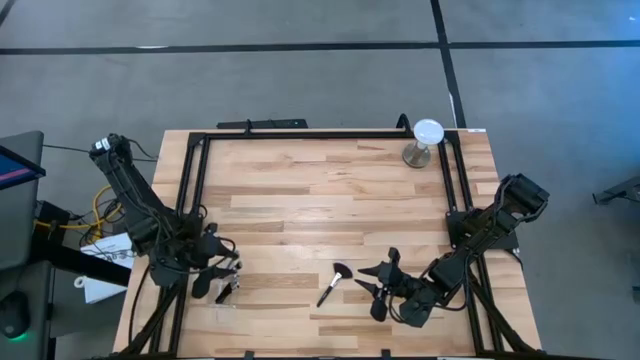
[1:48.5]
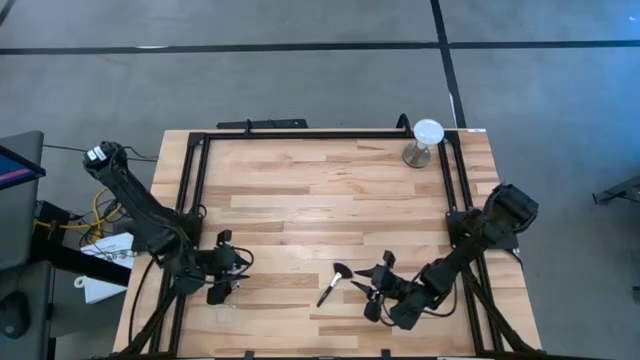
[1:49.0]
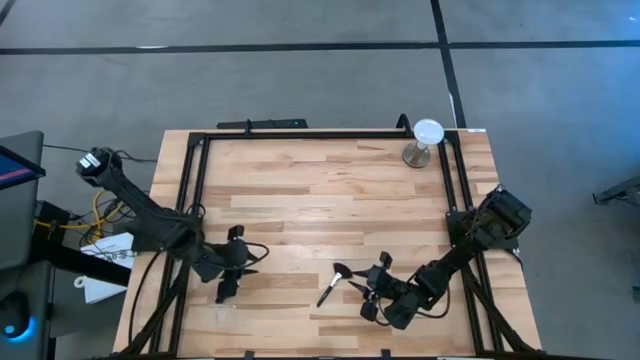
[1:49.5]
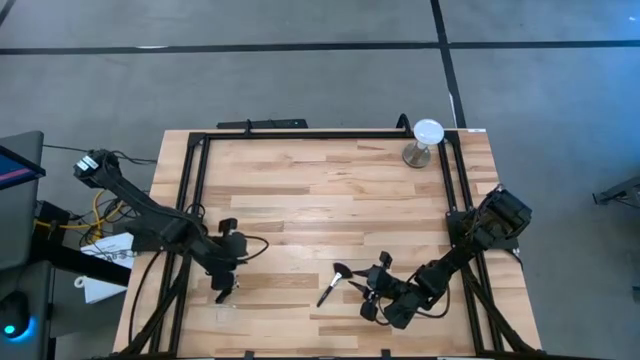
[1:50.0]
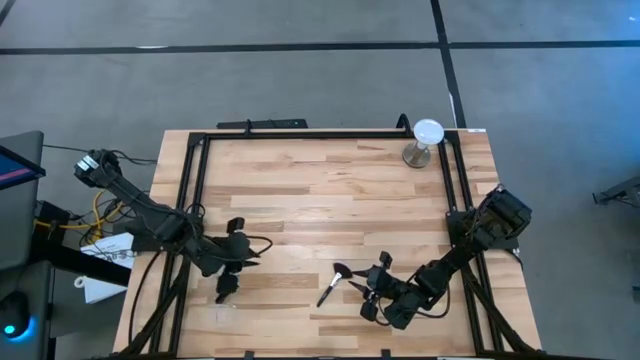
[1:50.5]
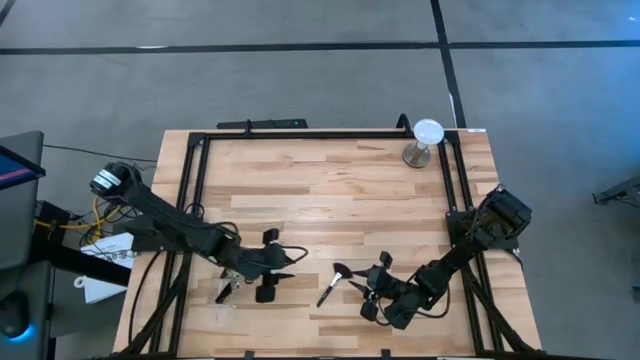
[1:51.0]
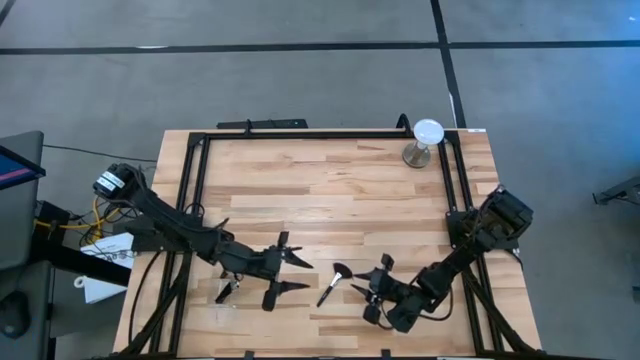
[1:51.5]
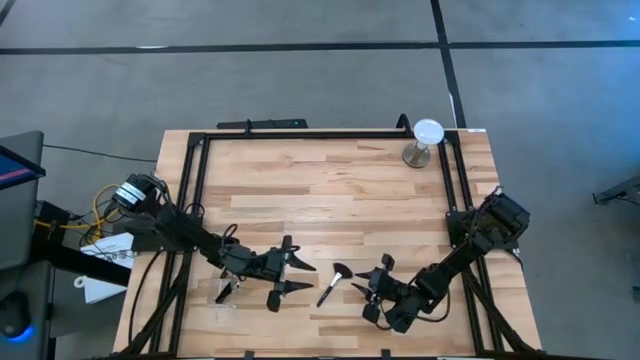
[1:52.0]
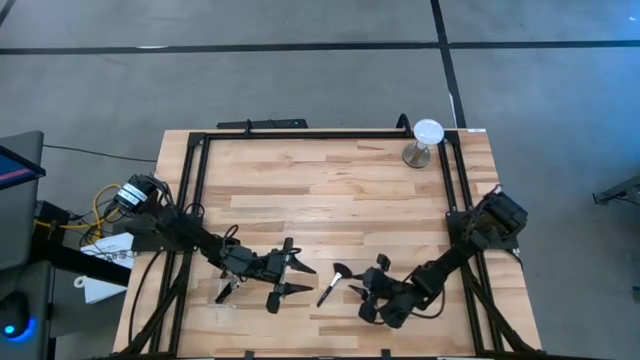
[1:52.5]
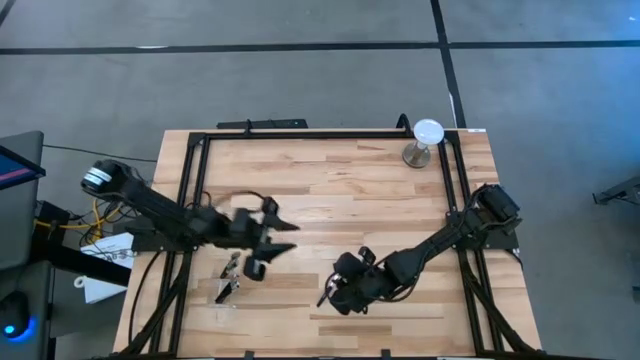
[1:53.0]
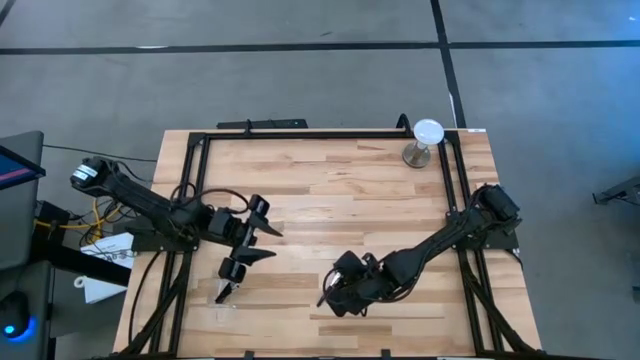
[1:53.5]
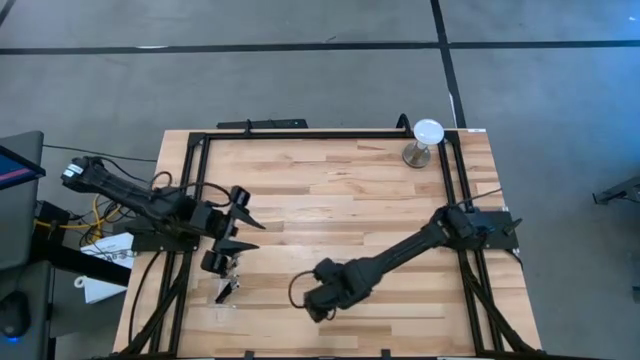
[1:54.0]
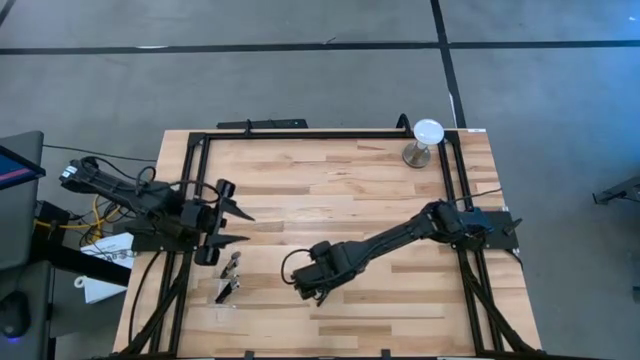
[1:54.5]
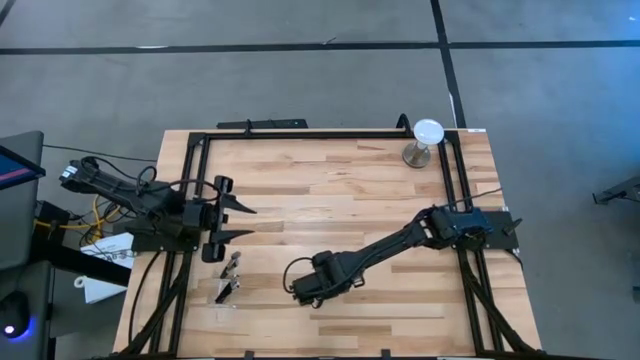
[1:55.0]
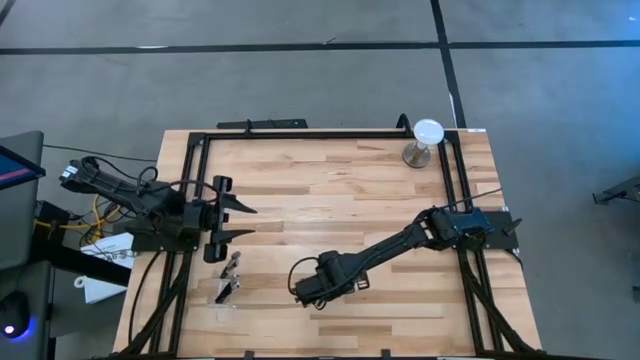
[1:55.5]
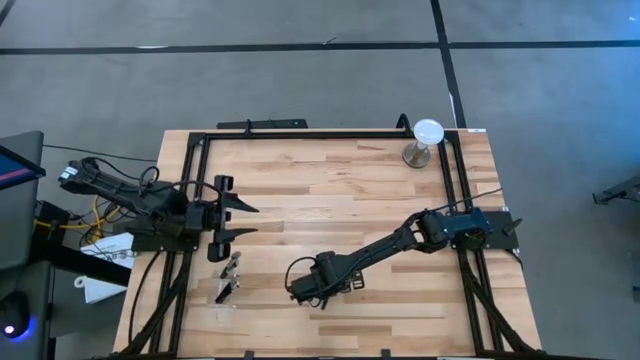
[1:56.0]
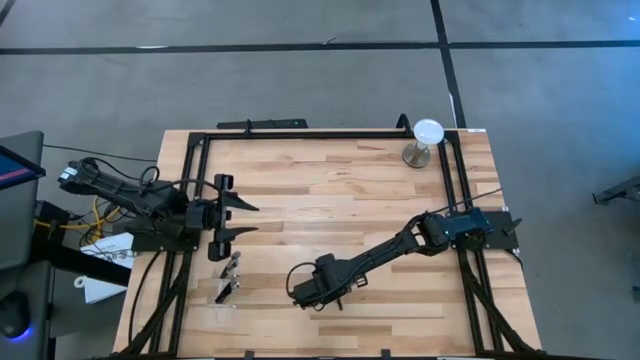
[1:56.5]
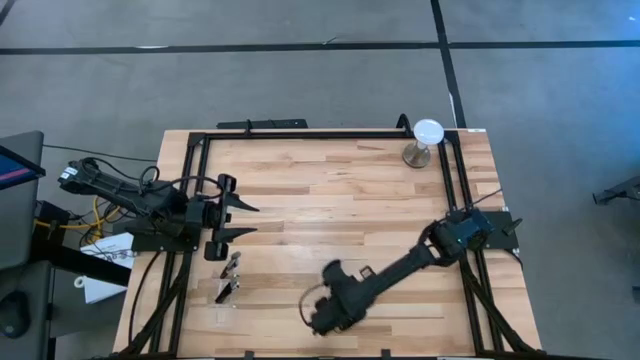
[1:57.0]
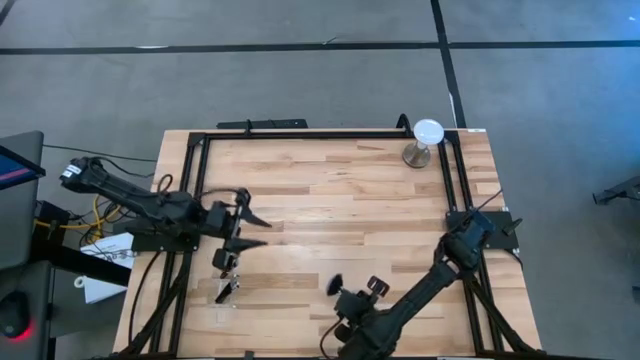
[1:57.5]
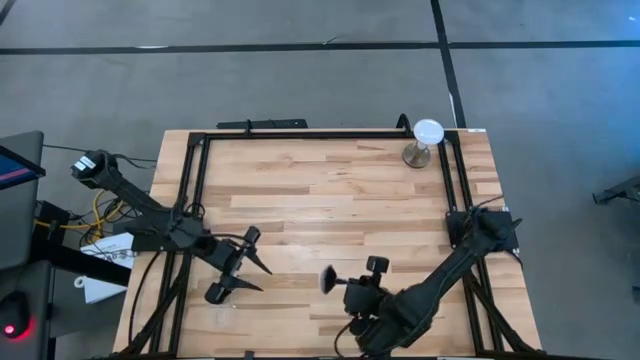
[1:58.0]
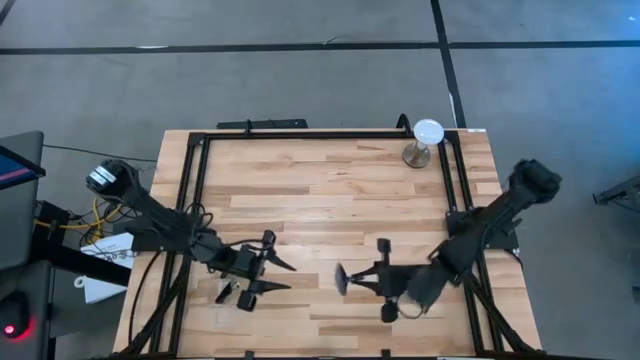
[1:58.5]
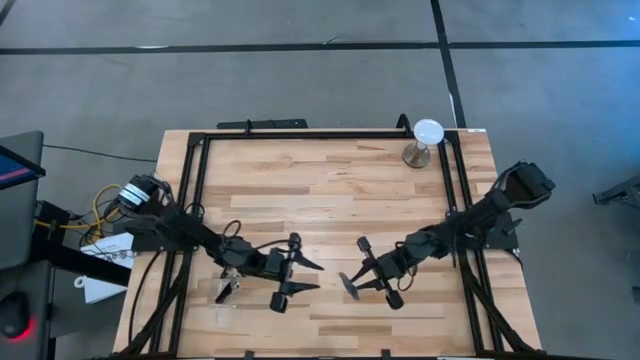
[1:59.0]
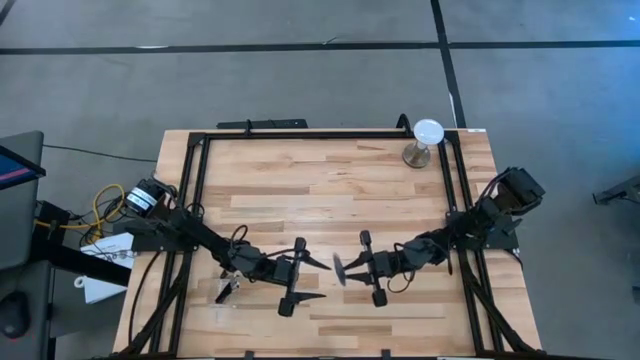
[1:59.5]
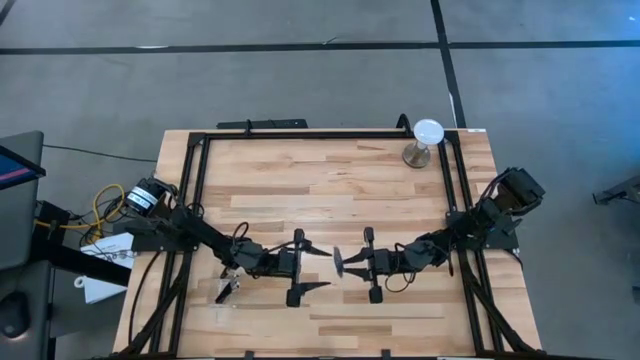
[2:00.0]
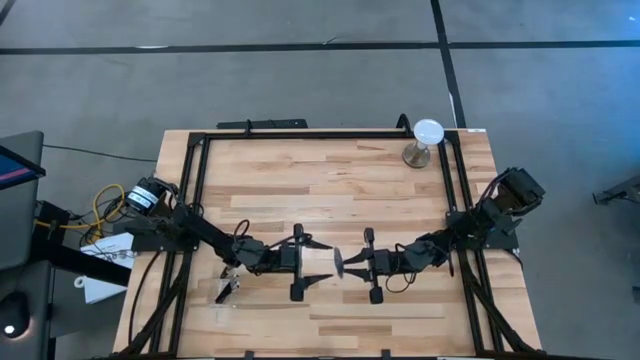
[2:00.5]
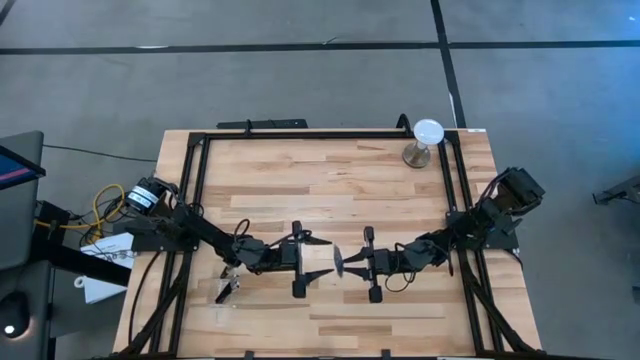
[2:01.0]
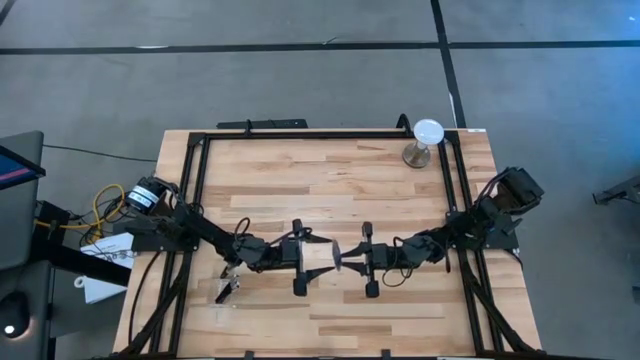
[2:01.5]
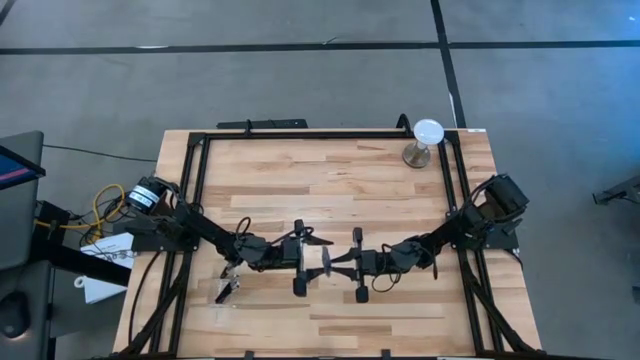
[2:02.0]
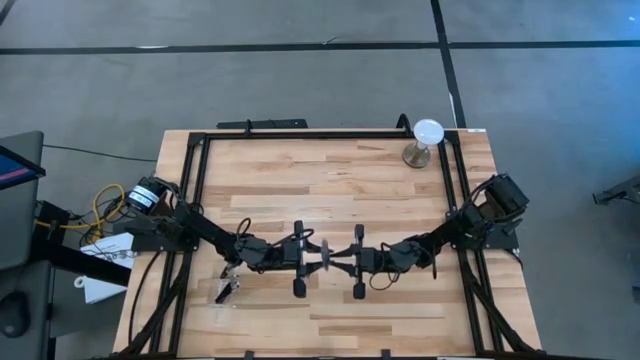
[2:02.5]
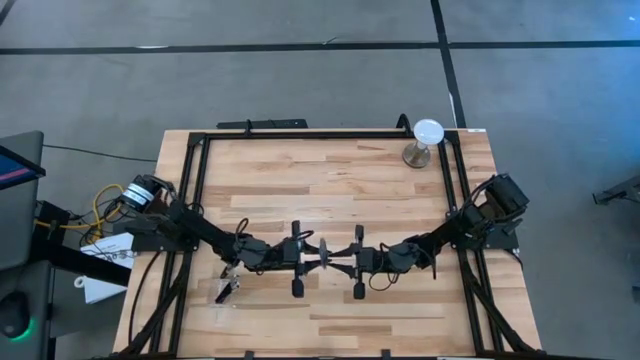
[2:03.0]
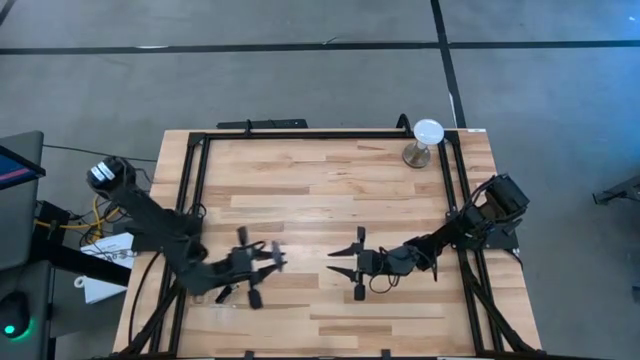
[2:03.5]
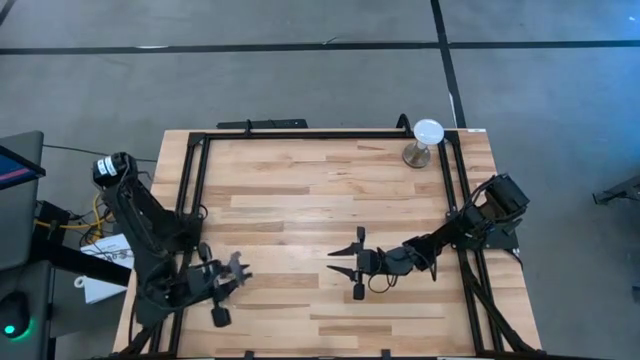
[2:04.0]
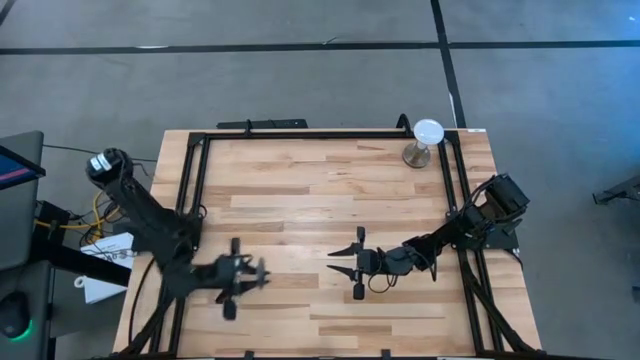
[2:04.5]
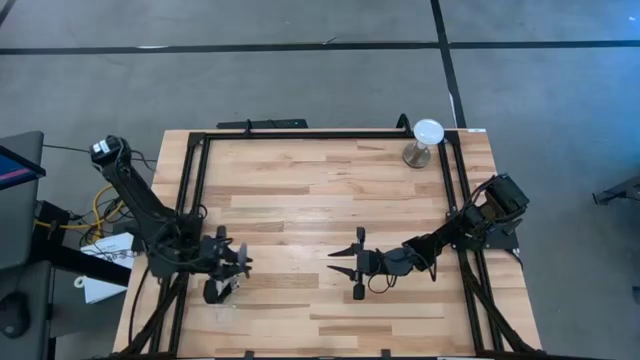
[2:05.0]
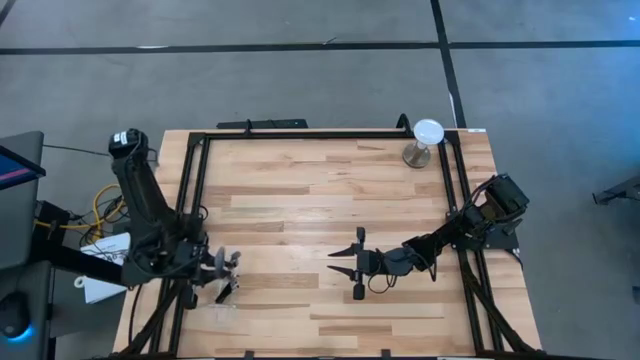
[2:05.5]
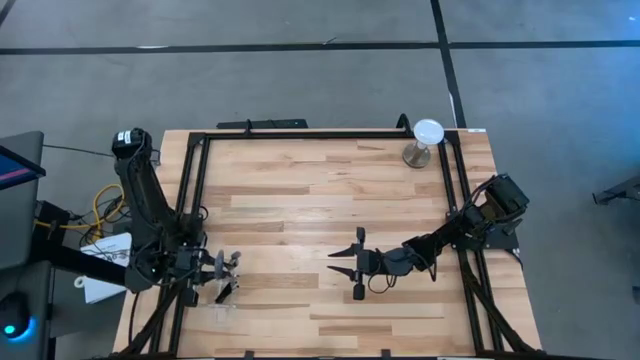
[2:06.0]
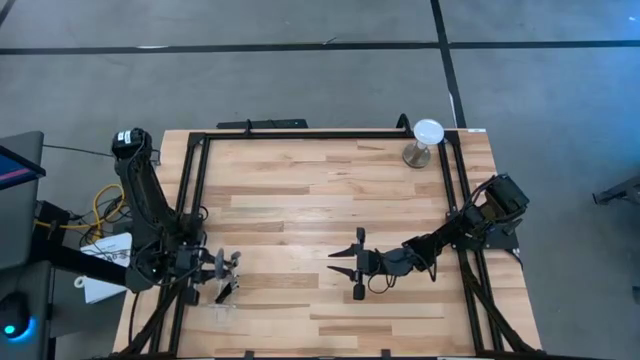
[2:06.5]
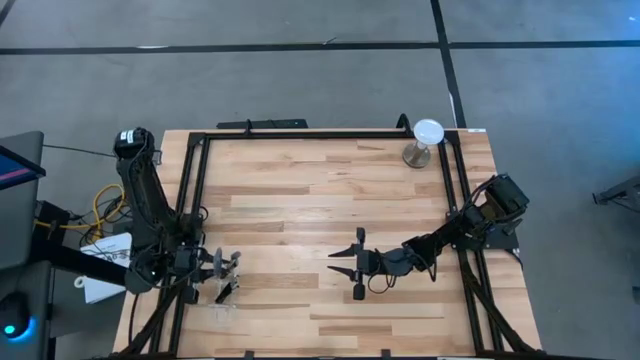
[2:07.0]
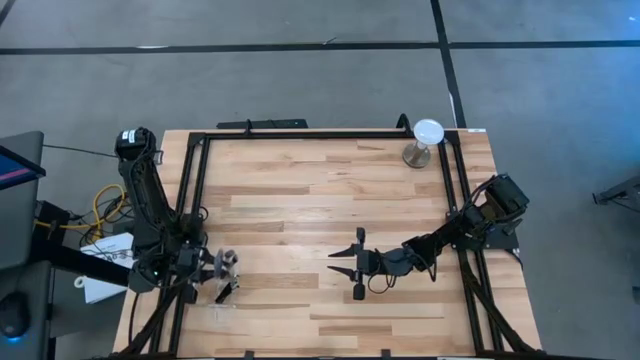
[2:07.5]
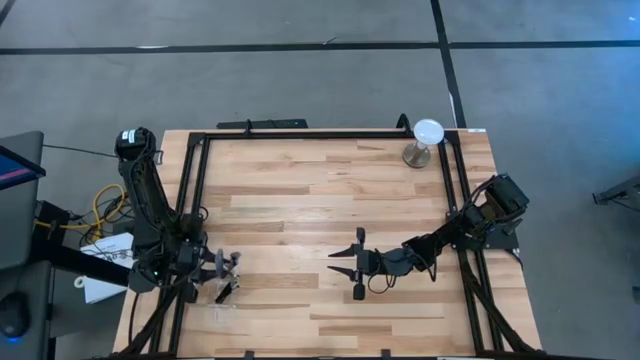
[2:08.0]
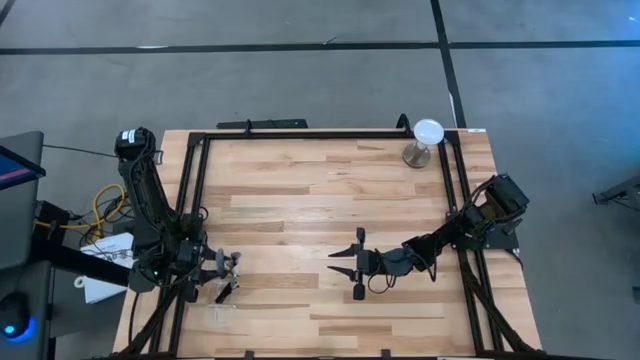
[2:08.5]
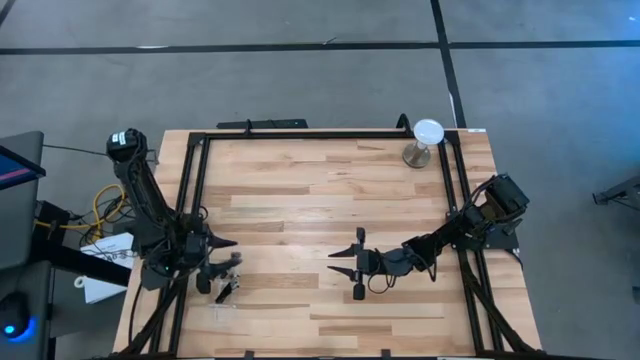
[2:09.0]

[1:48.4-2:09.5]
Task: Put items in baskets/containers
Put the highlighter brush into the transparent organizer

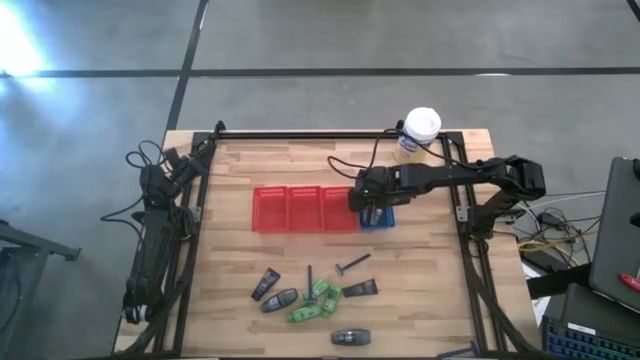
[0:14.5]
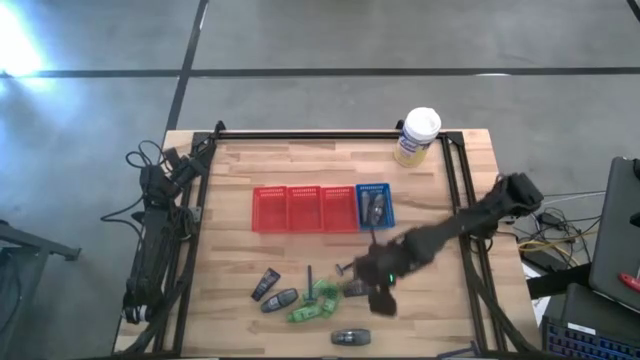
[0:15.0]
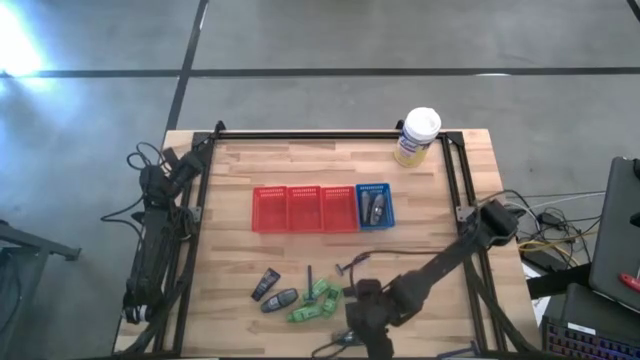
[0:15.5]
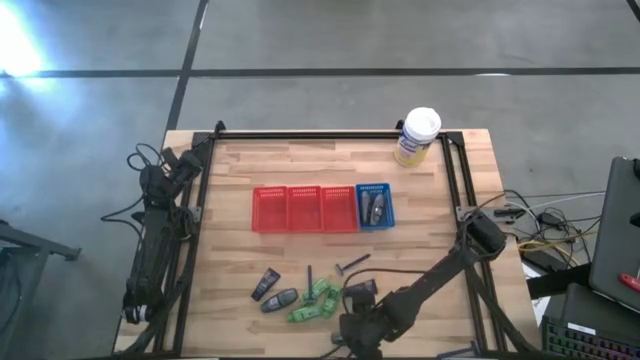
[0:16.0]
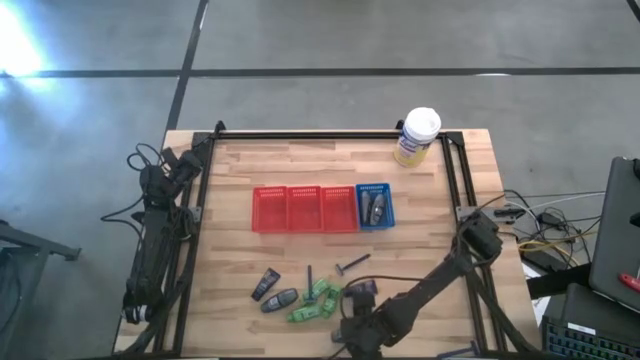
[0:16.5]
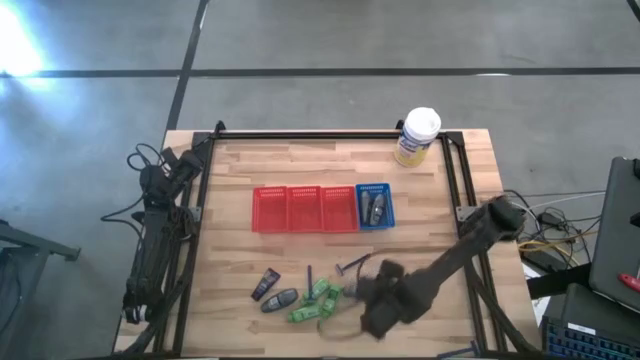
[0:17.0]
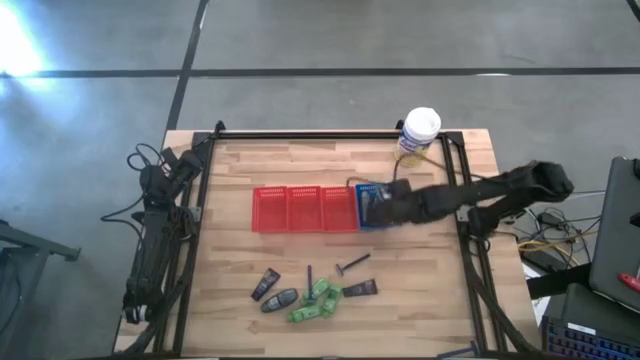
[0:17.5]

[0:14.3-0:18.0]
Task: Pick & Place Travel size toiletries
Put the black deodorant into the blue bin
